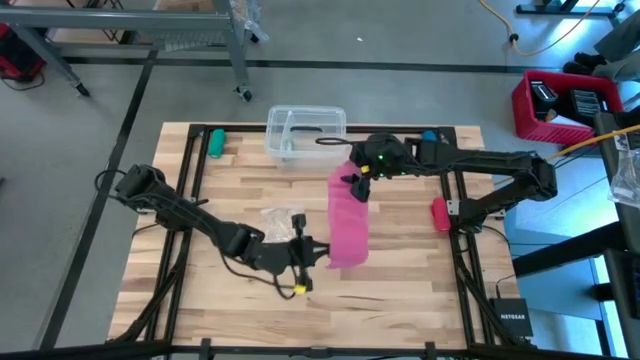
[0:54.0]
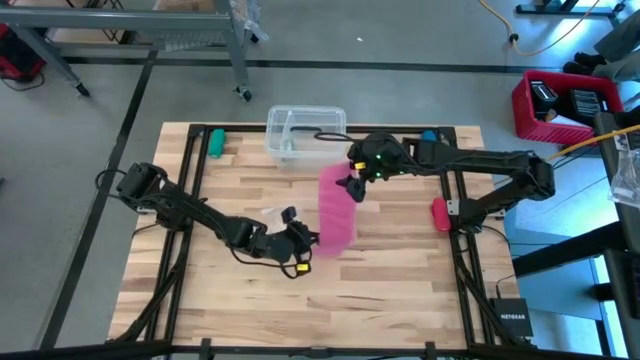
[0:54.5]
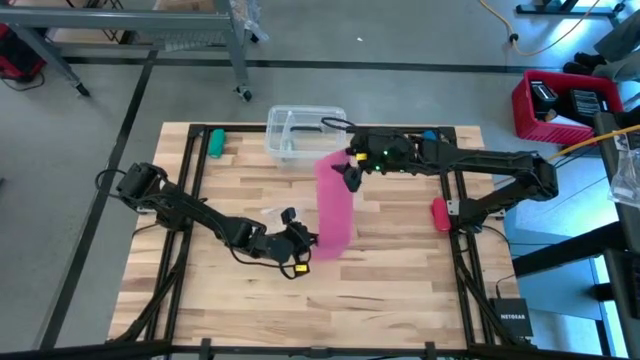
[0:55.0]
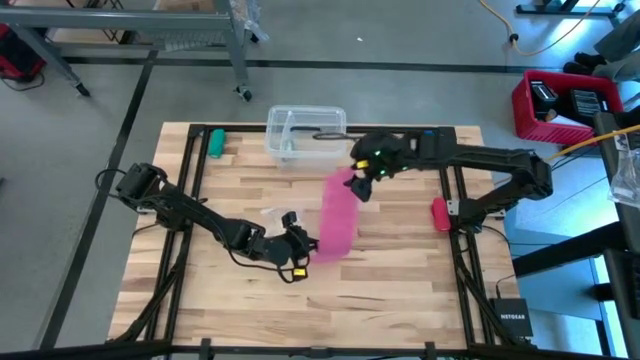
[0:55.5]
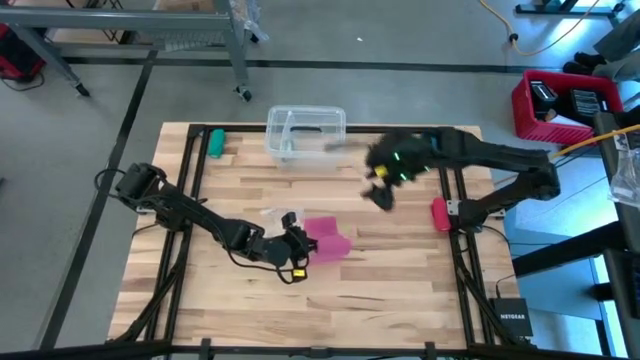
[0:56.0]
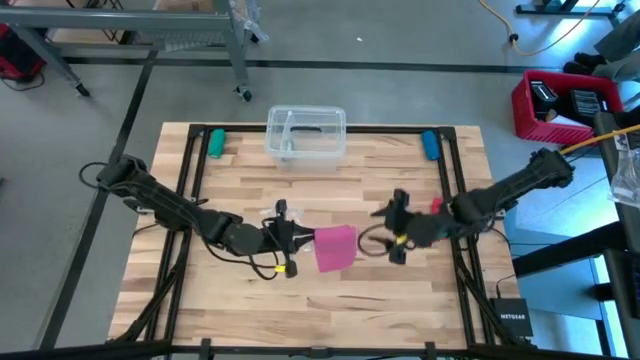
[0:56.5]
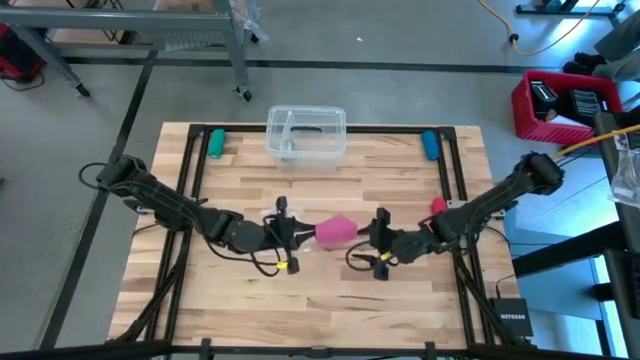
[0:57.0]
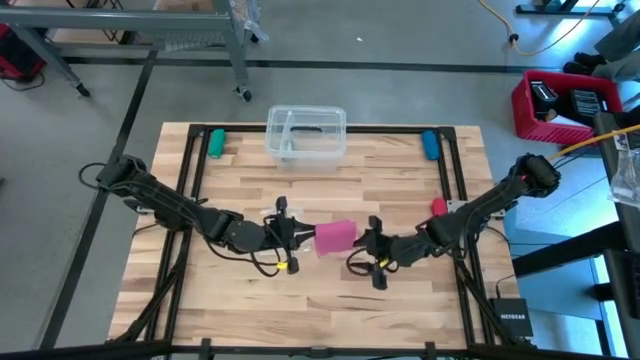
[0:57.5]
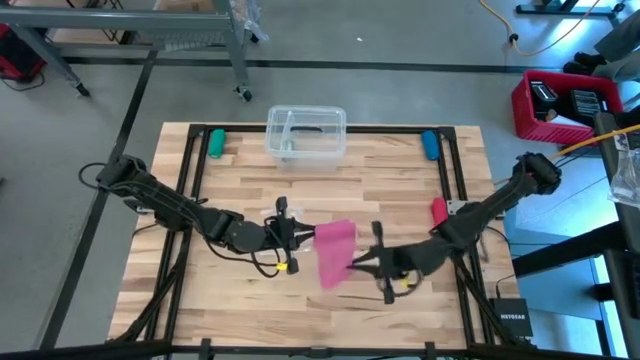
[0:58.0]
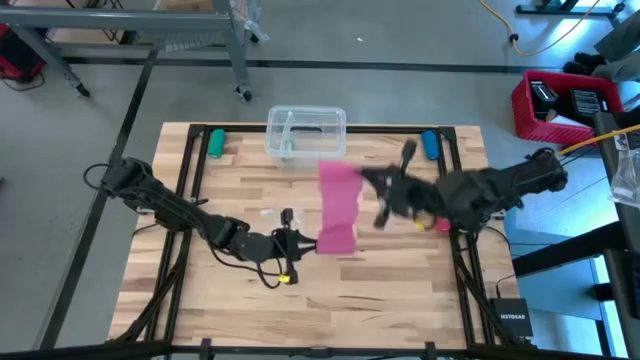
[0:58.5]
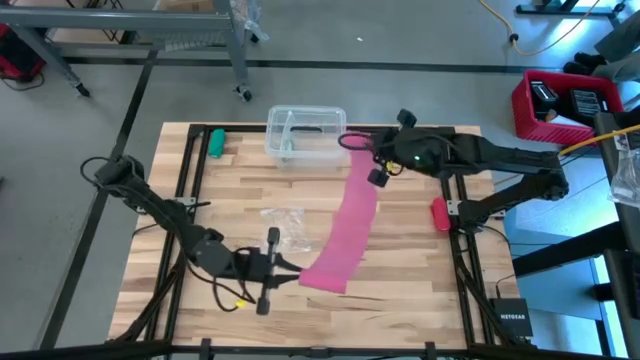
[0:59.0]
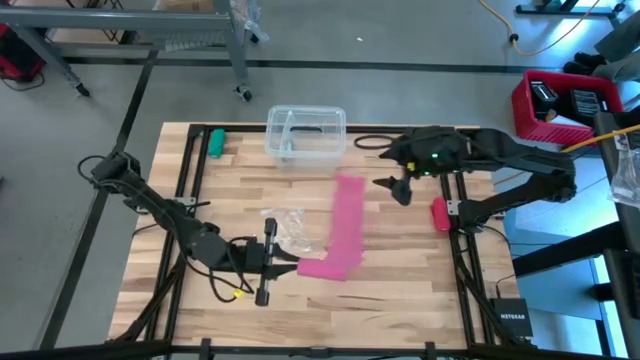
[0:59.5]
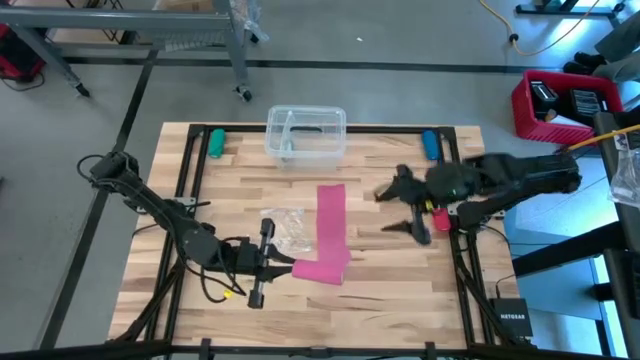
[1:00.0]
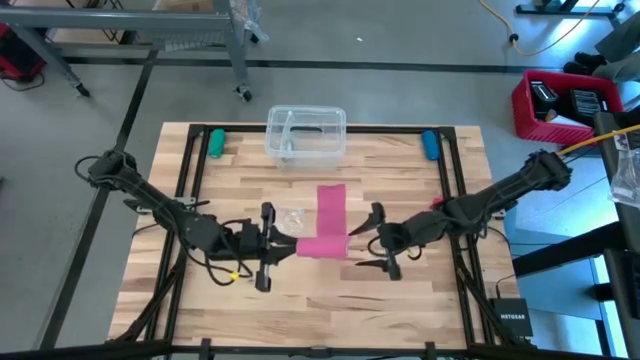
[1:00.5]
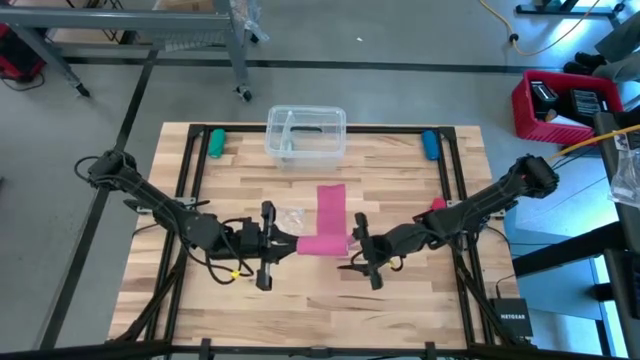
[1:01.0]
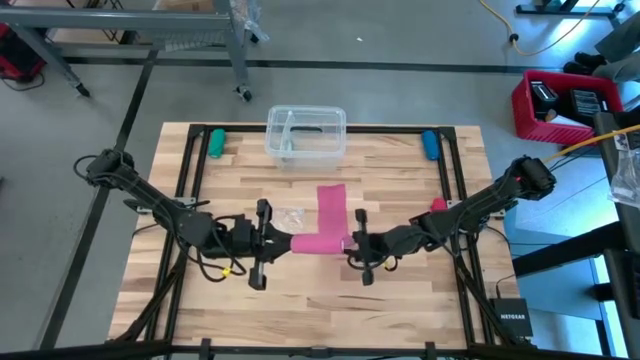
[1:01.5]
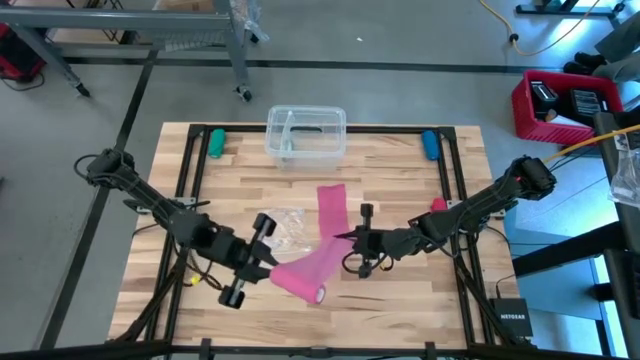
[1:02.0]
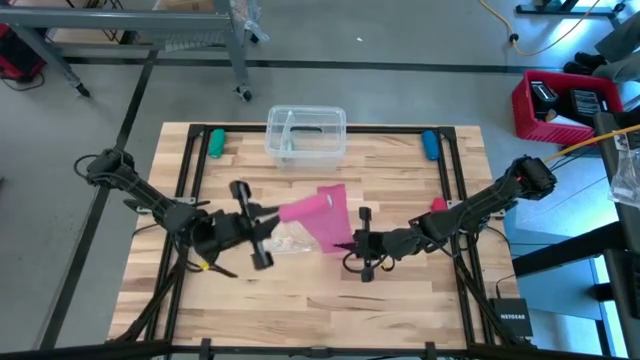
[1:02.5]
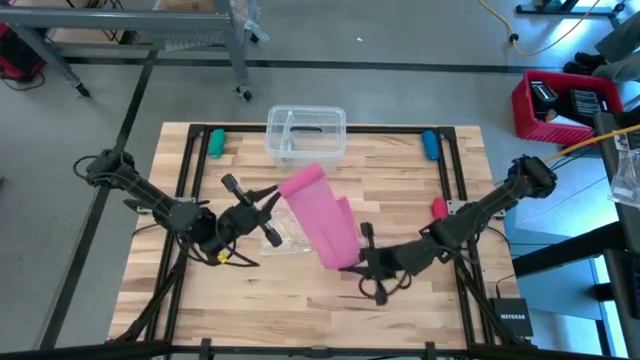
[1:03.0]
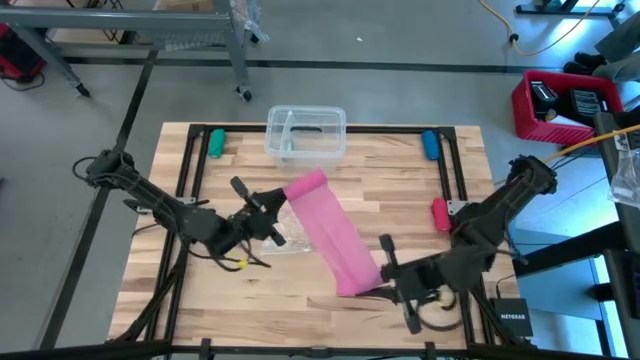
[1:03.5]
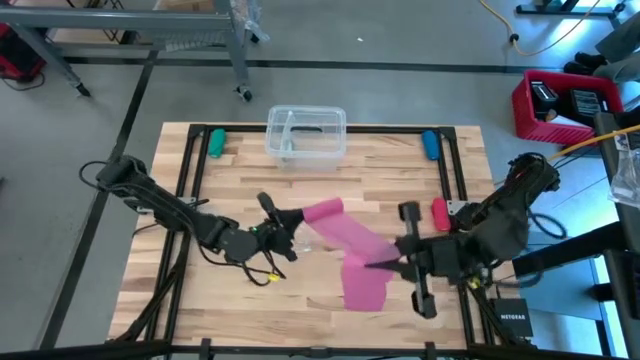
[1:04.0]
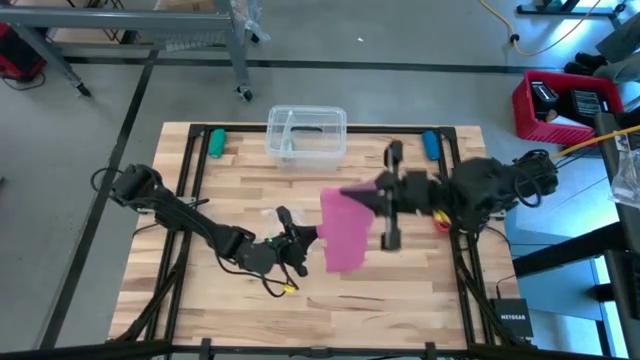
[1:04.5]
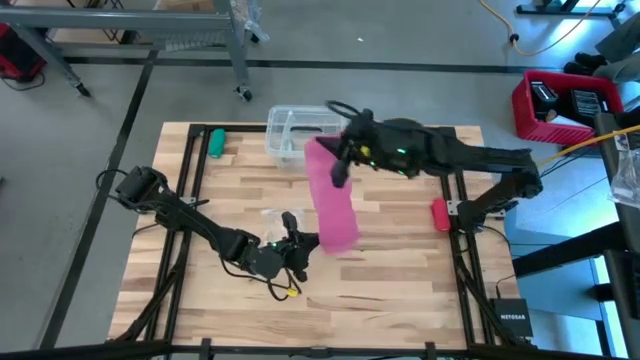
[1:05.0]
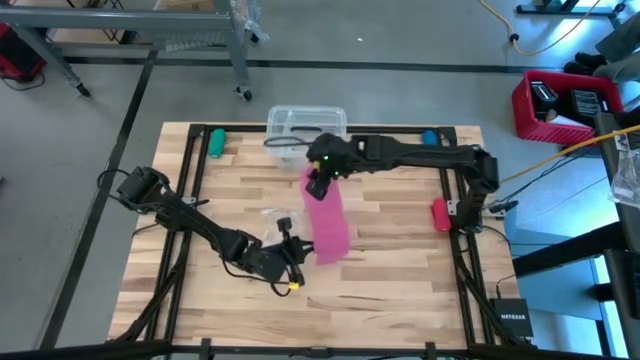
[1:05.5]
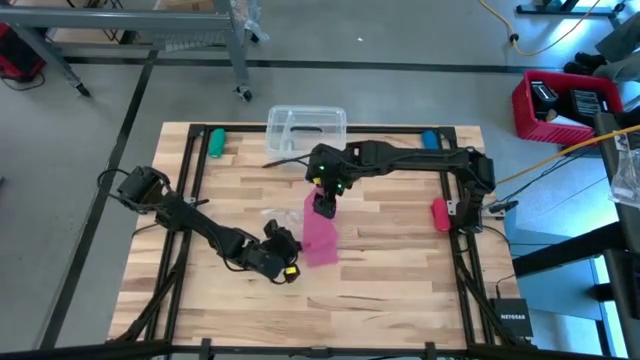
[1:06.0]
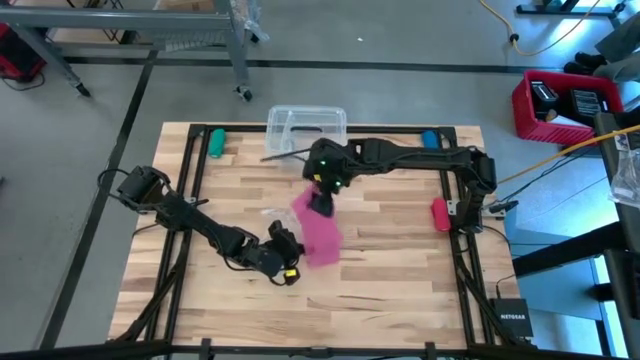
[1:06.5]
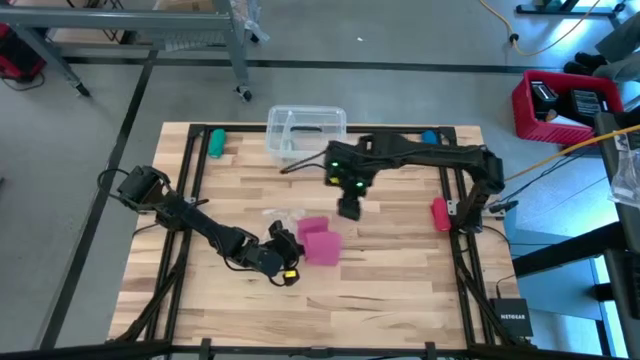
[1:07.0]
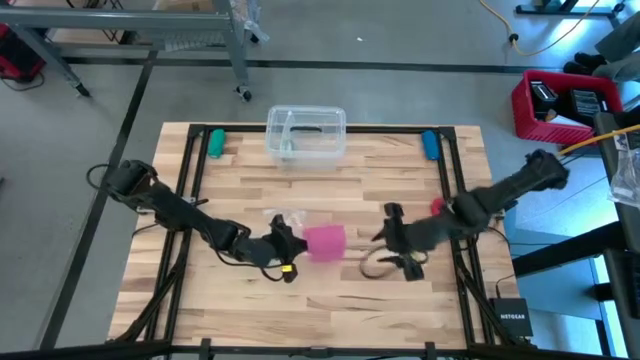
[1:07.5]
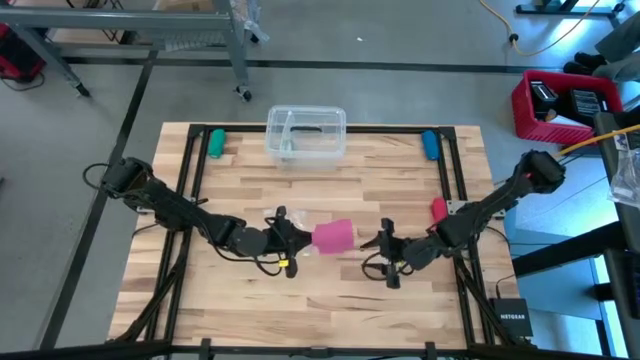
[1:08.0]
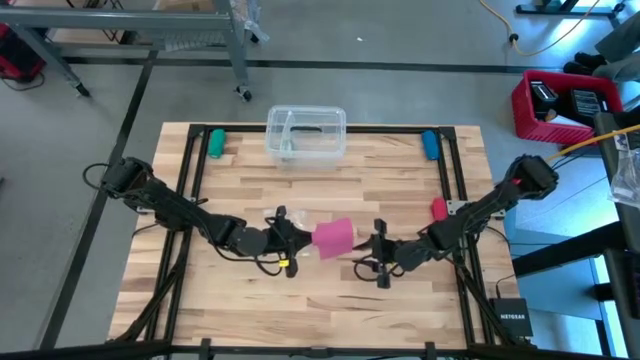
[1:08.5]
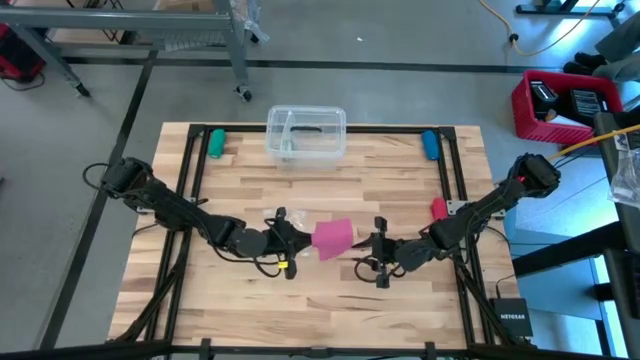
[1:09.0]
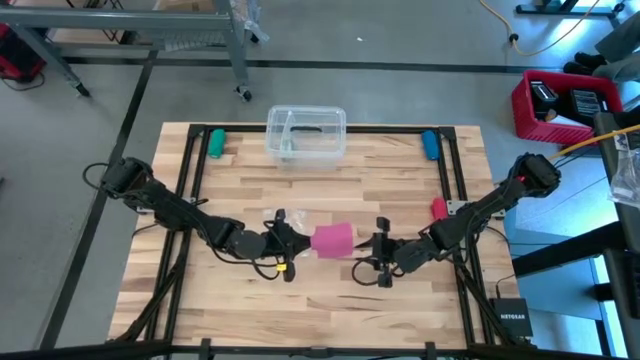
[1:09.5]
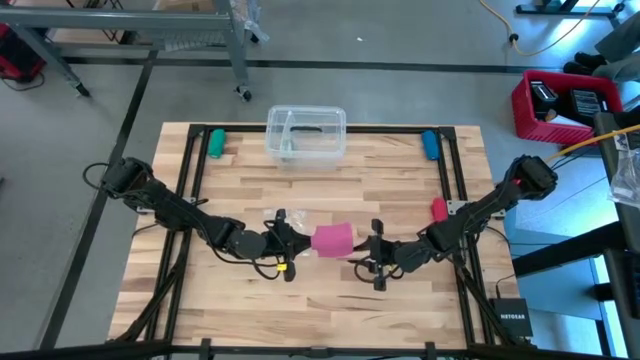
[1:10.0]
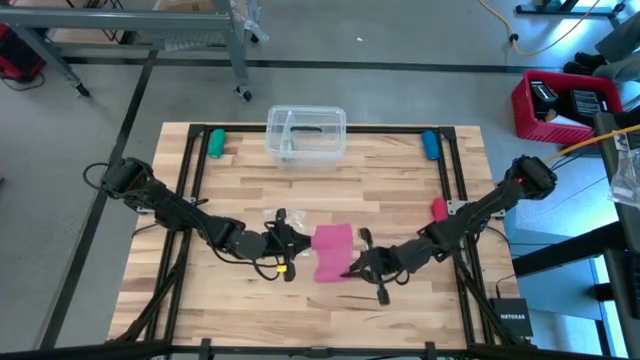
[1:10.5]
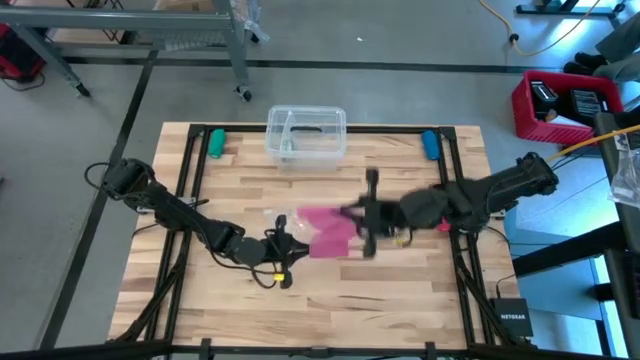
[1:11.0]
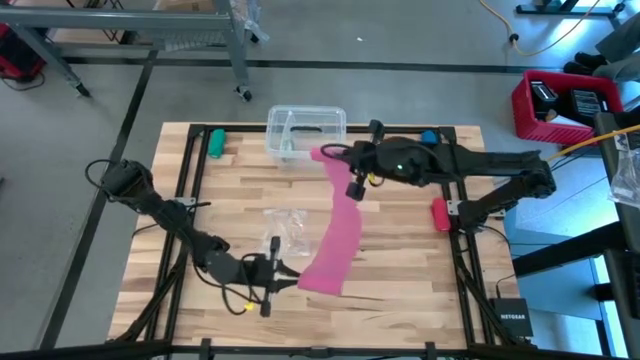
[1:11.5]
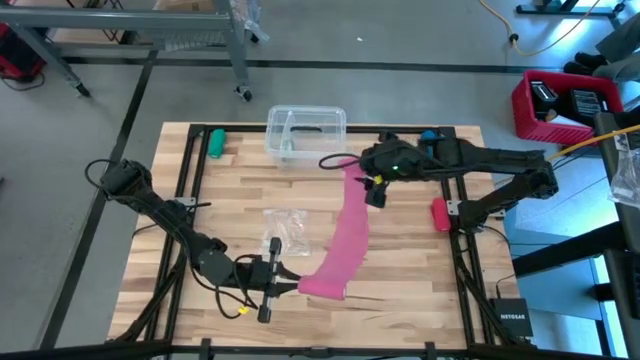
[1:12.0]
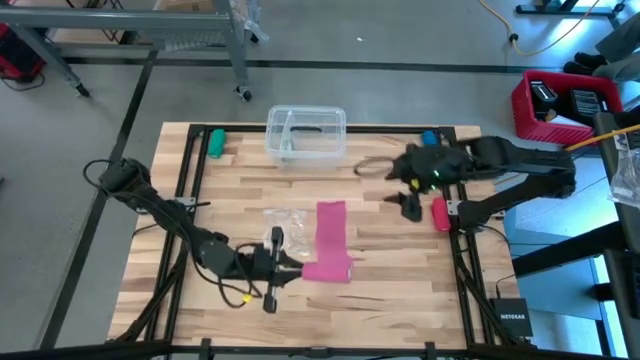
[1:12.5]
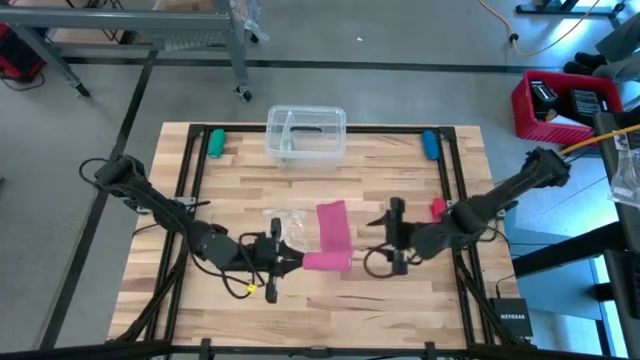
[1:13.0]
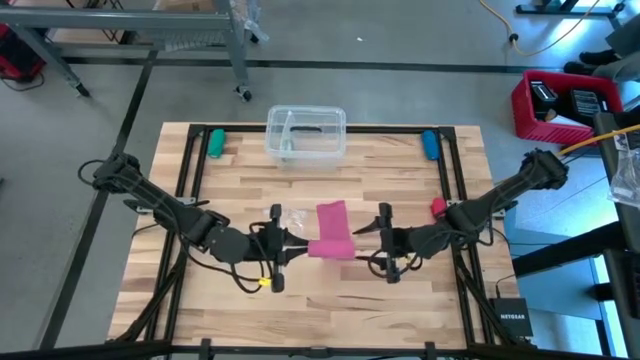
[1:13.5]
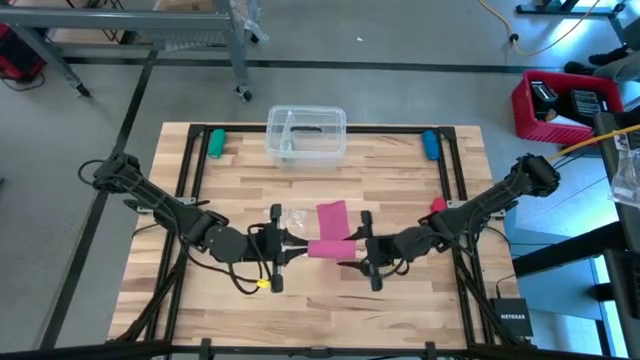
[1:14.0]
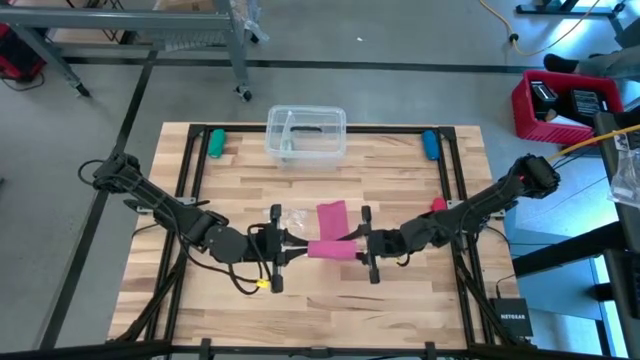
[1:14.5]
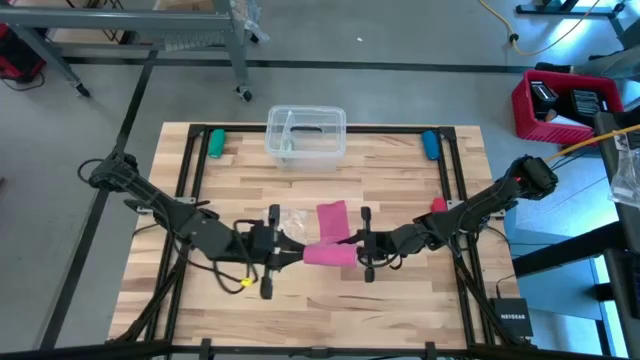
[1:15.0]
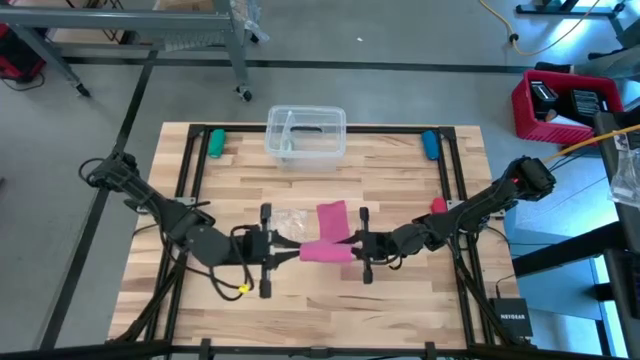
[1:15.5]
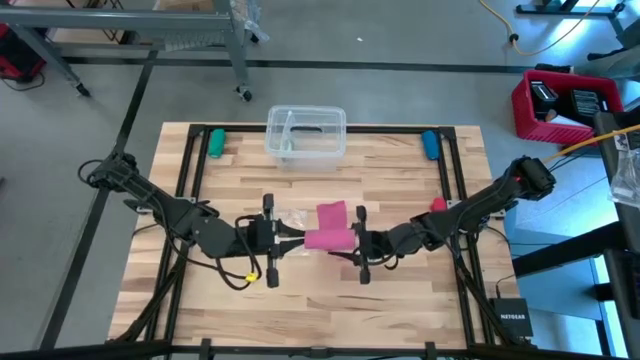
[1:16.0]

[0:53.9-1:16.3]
Task: Roll bandage
Roll the pink bandage
